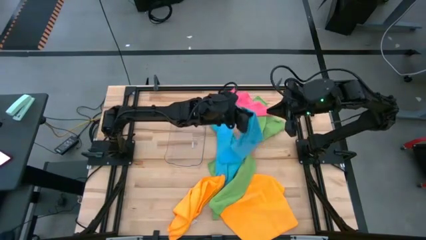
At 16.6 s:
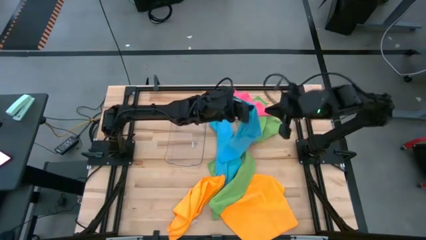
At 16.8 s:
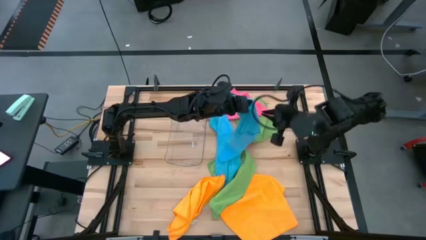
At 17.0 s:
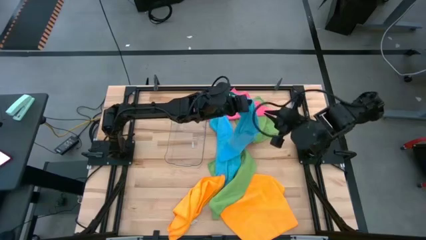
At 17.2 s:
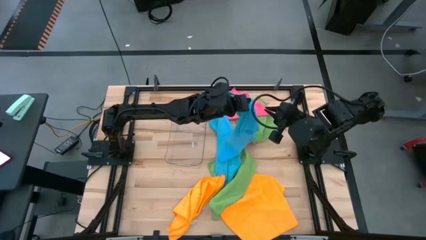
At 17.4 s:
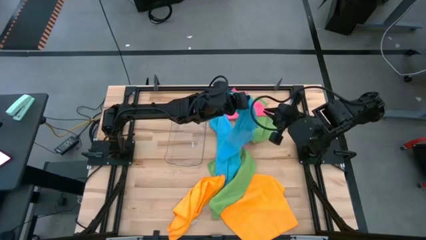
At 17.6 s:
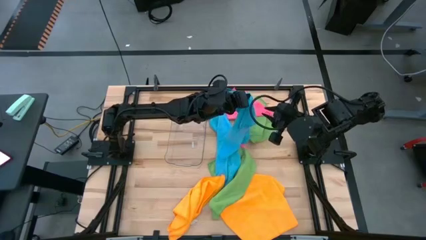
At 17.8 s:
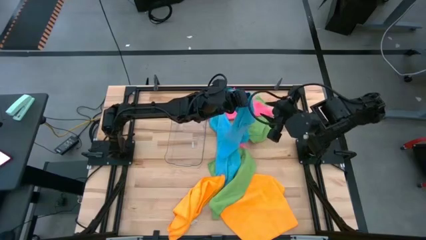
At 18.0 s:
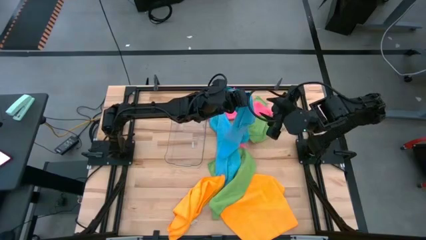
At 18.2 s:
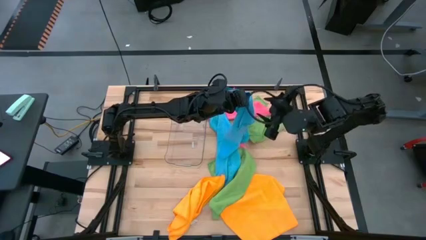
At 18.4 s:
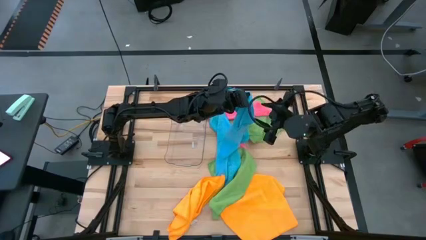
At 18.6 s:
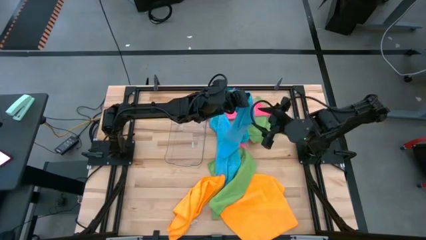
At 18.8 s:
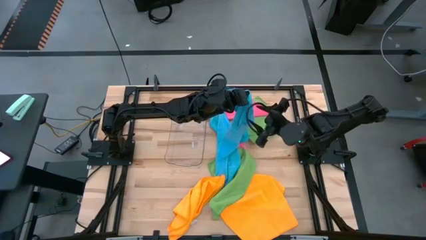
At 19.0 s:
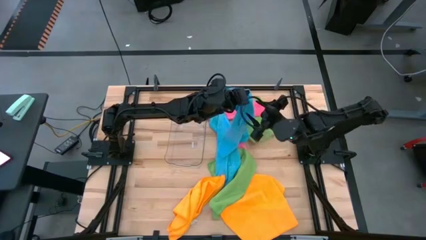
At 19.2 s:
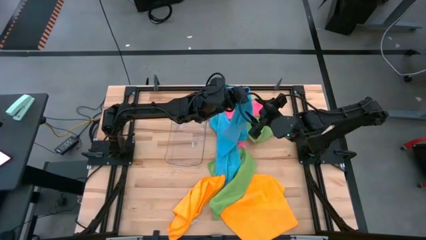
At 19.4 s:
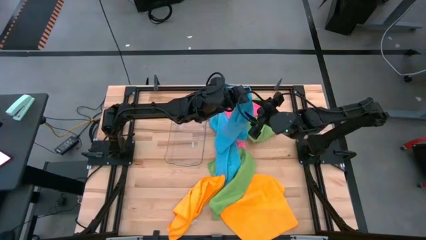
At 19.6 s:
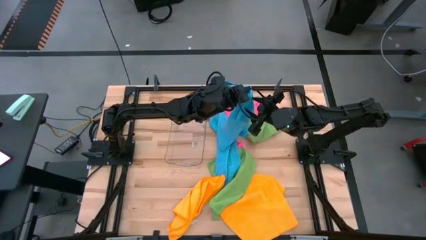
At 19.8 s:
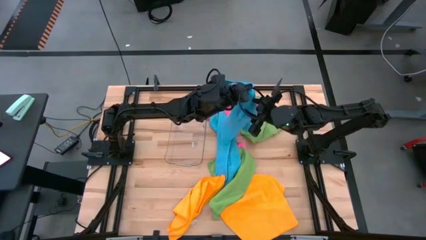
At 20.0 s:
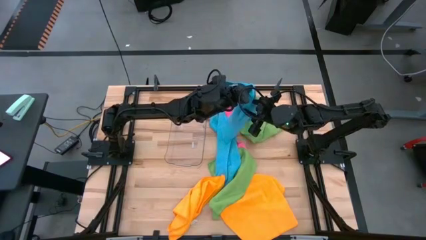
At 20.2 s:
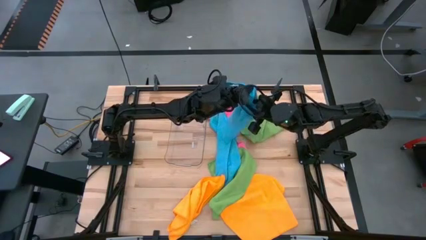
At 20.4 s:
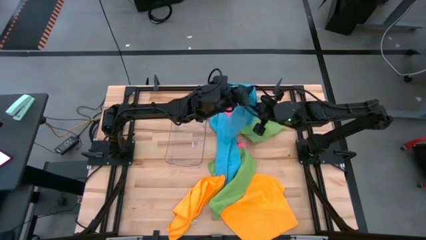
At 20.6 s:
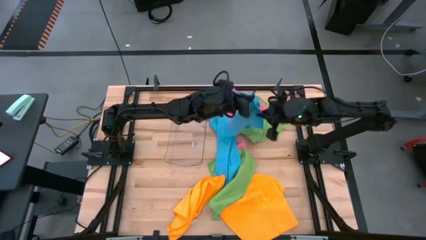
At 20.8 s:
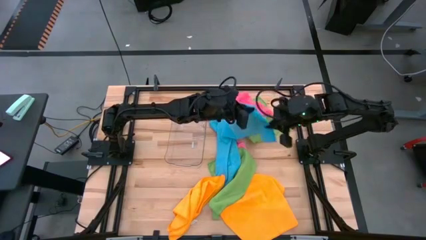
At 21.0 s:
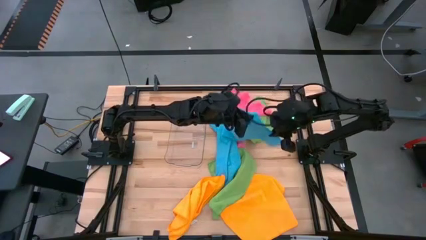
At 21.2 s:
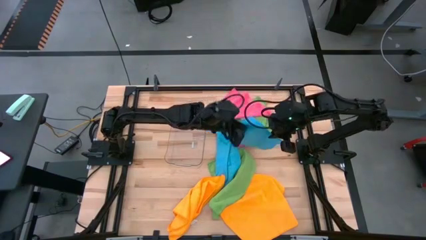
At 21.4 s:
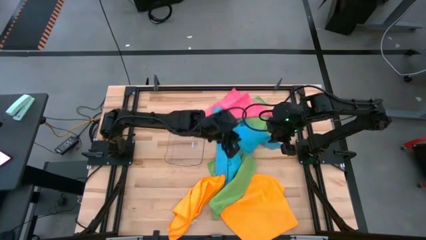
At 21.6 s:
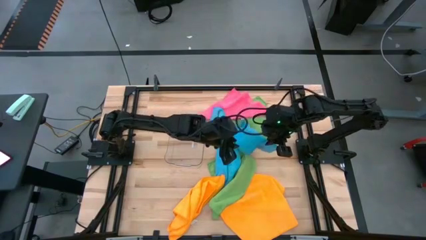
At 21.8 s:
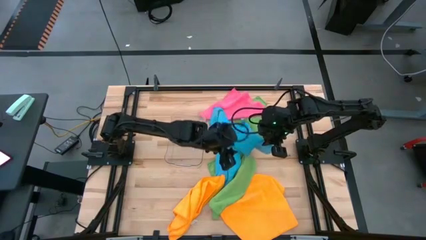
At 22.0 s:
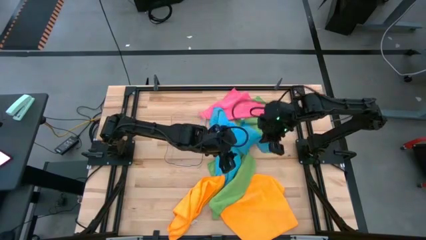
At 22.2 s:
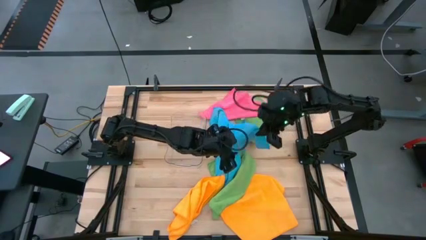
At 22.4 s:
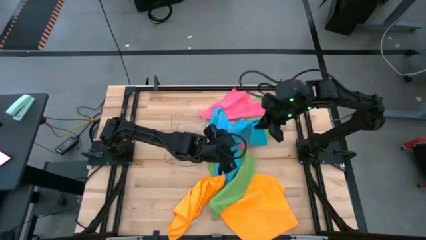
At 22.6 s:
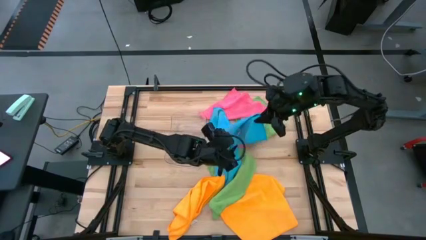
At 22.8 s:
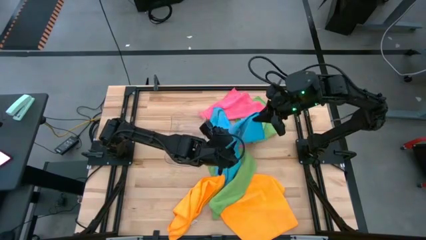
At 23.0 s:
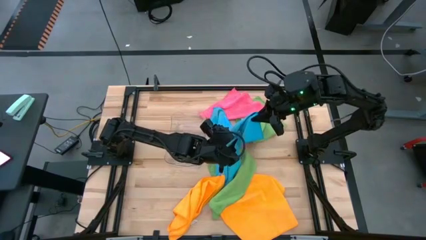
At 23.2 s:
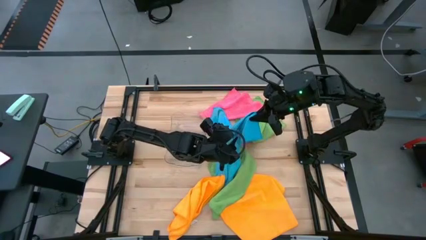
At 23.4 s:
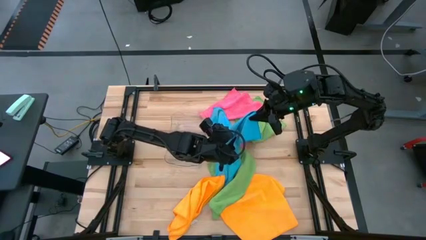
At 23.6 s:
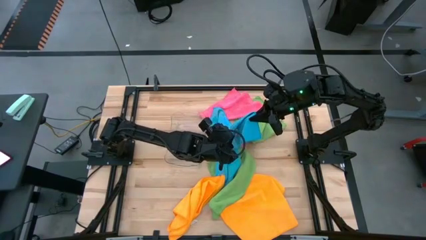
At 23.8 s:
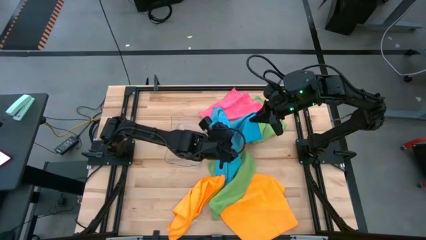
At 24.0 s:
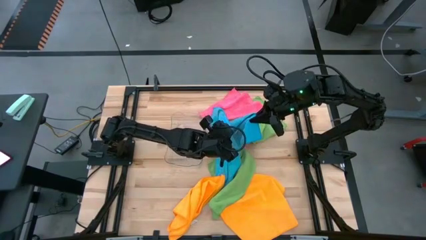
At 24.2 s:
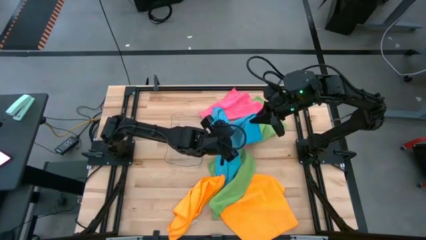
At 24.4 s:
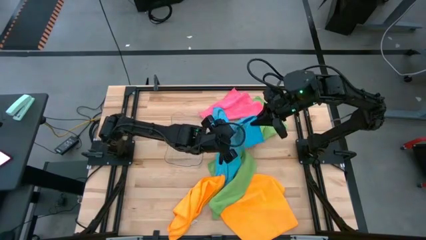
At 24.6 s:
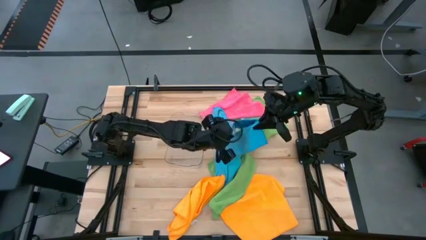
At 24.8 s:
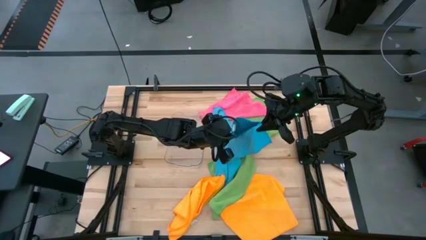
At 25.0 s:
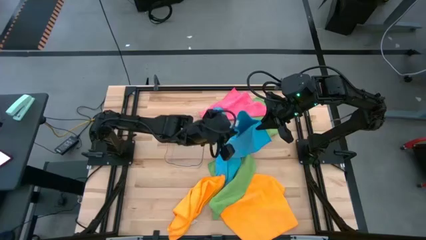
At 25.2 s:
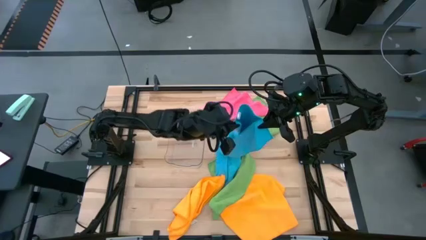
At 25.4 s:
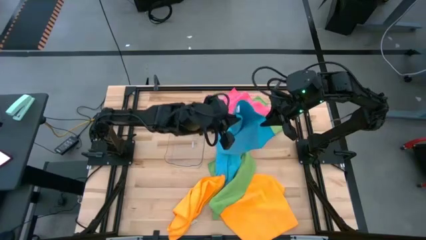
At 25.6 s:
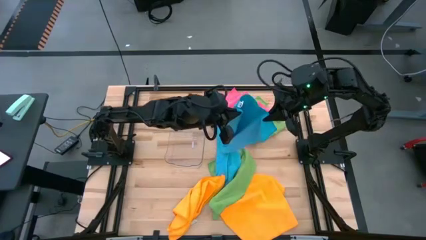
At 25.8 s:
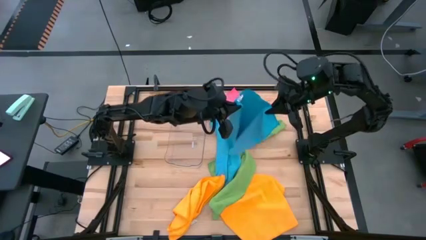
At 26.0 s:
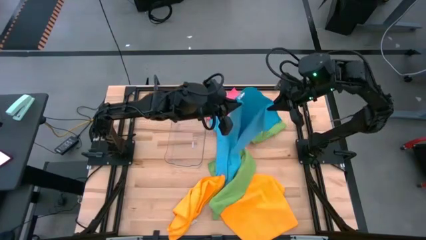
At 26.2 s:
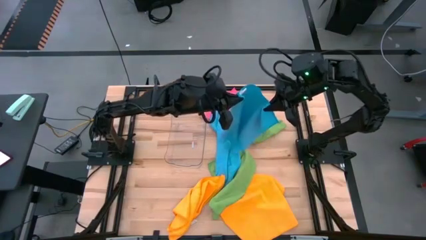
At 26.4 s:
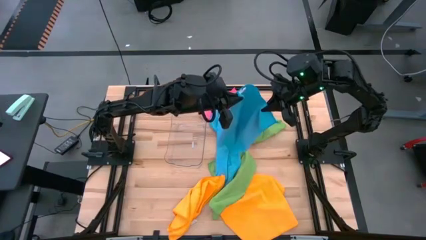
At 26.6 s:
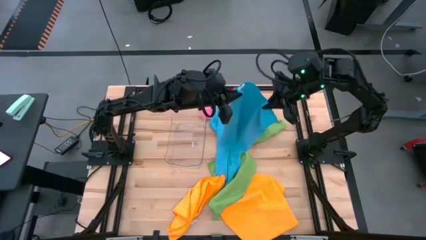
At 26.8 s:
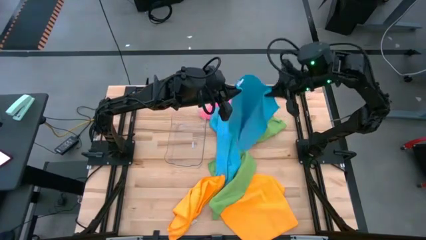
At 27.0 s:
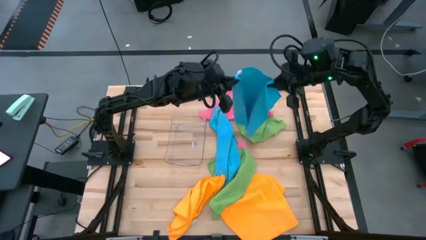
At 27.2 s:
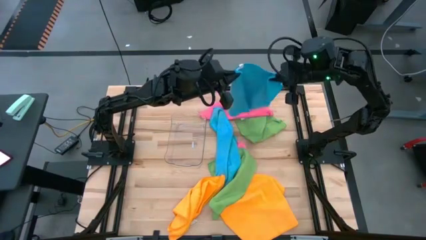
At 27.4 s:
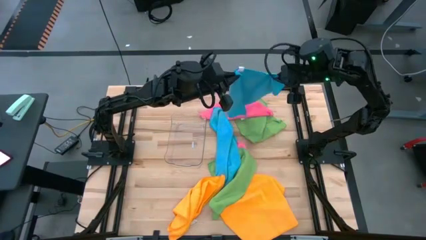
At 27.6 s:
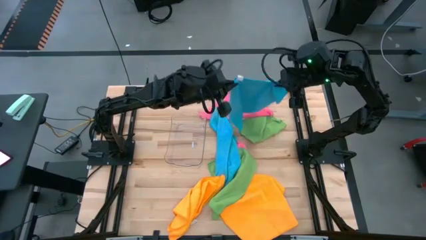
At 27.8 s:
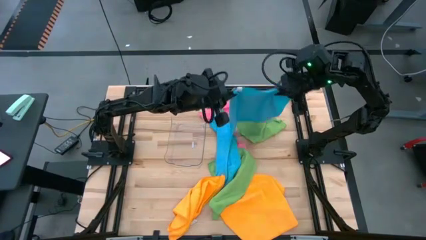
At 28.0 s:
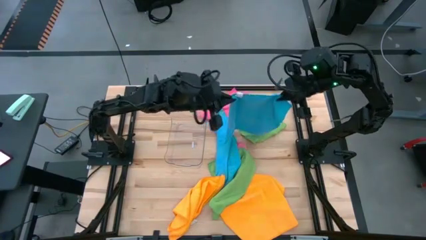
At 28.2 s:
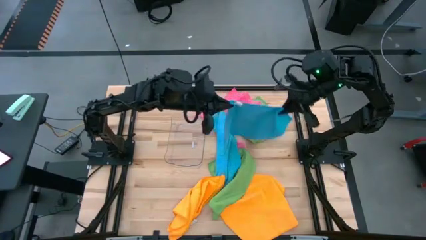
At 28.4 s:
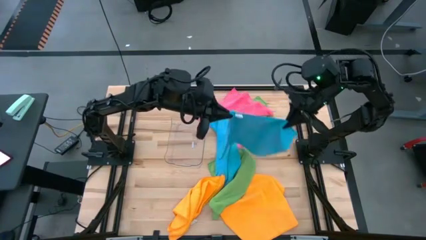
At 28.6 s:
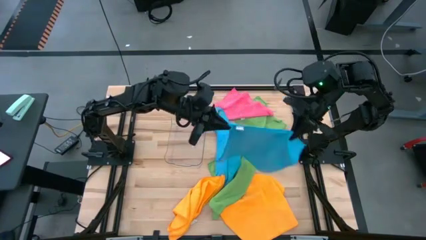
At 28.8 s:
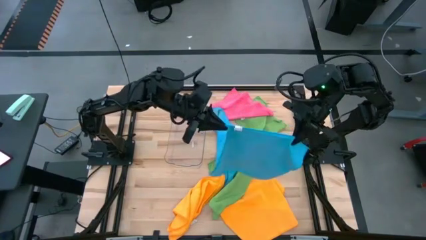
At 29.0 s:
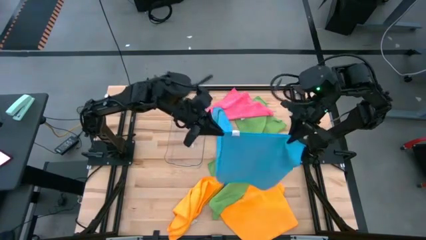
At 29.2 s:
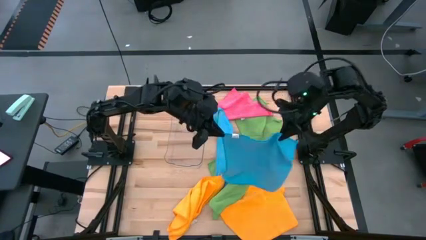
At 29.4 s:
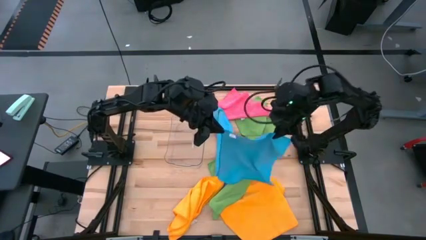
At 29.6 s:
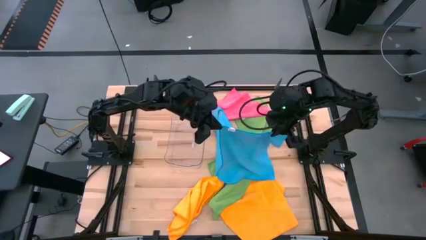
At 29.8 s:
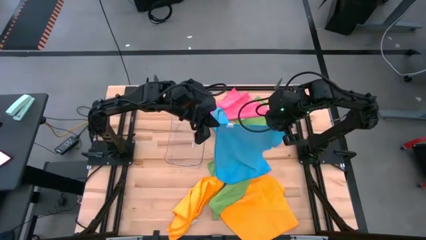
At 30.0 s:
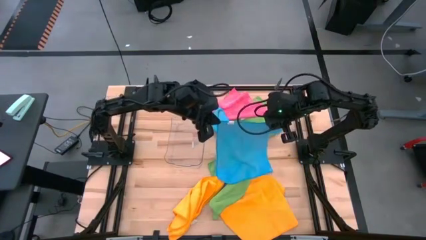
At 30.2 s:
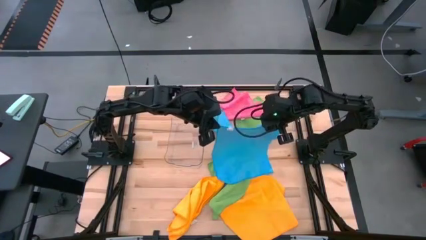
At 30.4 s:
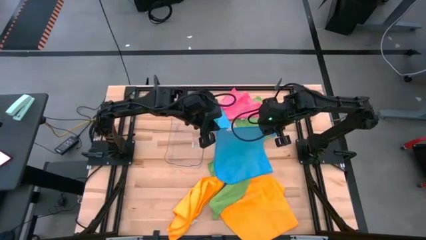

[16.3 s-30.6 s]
Task: Fold microfiber towels
Fold the left blue towel

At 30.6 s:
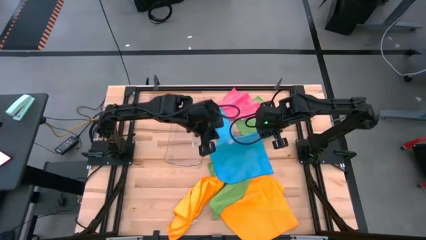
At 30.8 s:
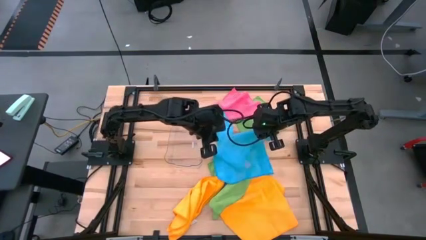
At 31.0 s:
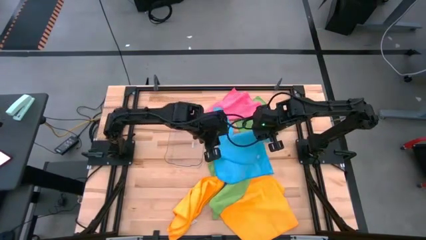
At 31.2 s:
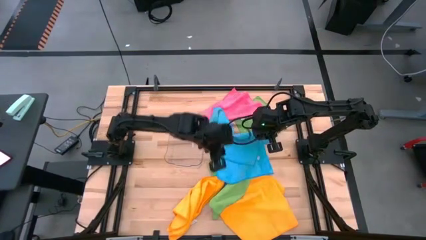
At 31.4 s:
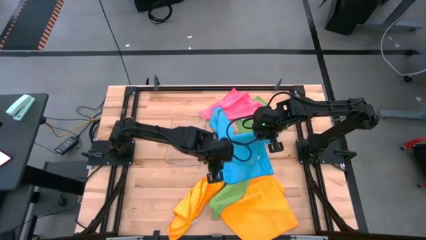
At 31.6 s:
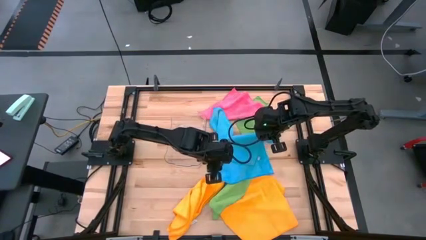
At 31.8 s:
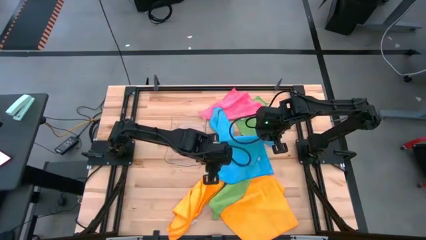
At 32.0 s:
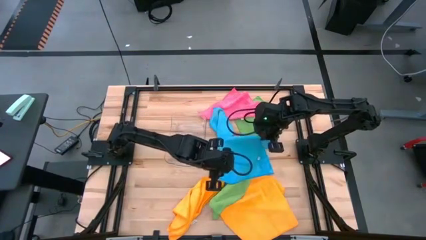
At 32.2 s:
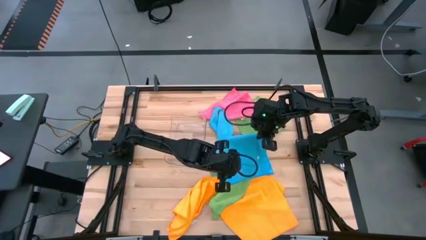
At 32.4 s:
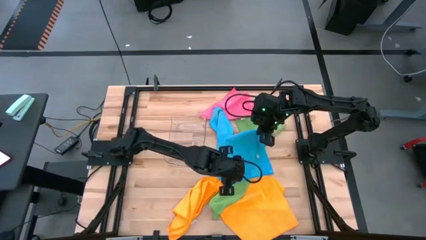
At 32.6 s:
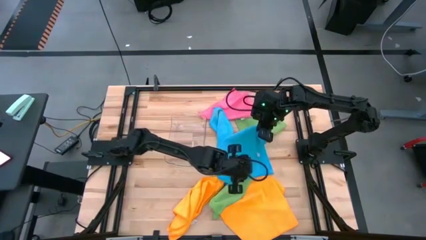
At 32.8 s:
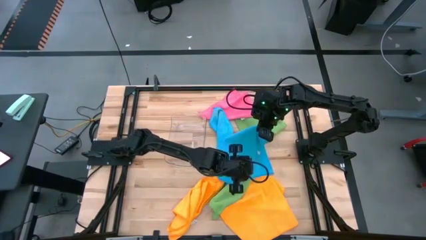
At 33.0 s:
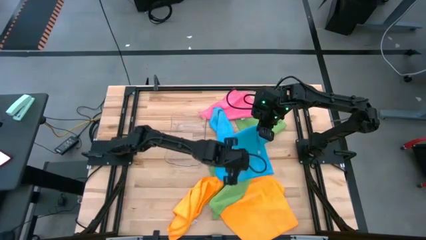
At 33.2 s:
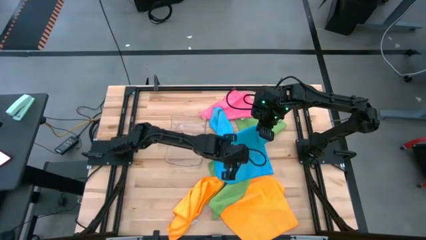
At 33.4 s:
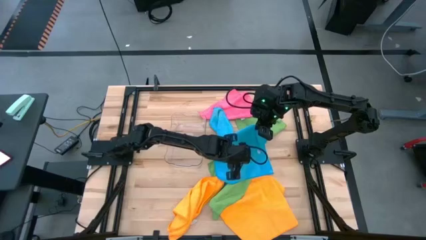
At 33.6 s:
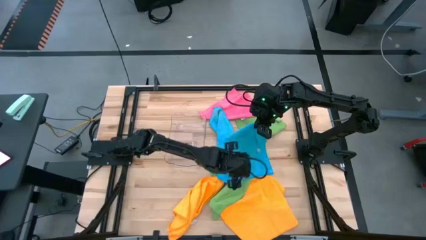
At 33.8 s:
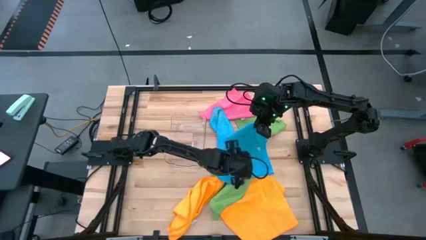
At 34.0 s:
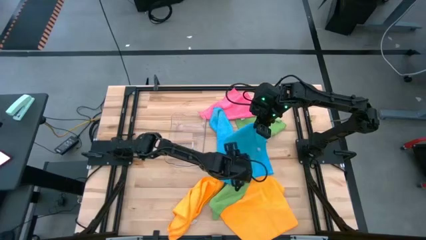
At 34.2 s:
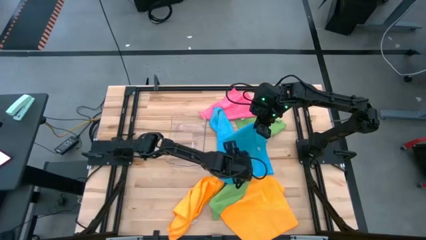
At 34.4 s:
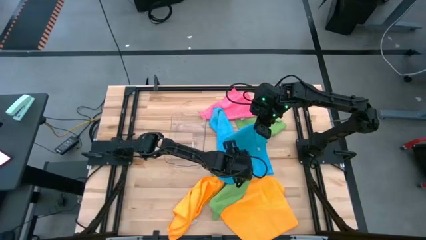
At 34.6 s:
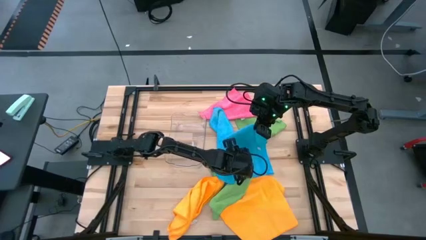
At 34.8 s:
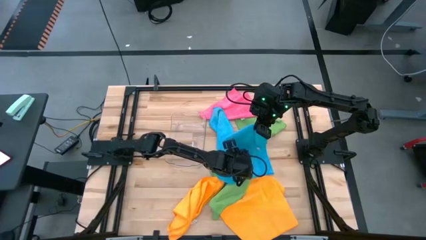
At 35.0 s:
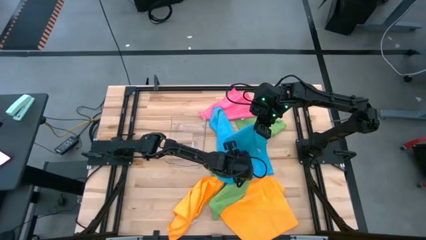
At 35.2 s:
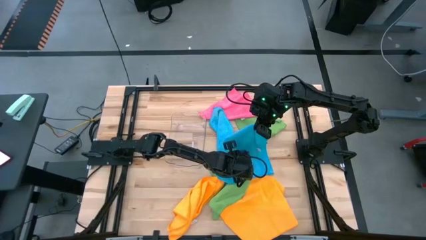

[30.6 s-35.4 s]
Fold the left blue towel
